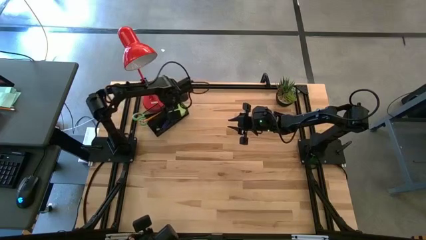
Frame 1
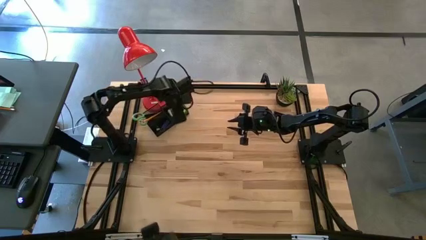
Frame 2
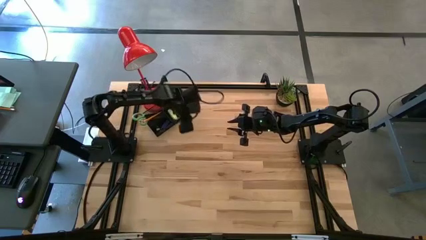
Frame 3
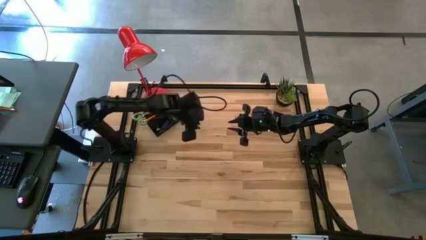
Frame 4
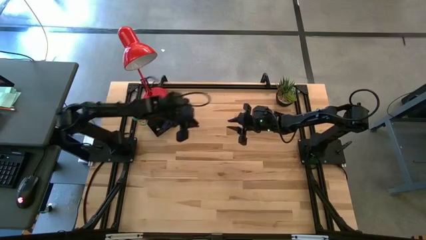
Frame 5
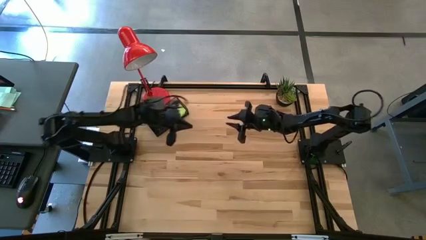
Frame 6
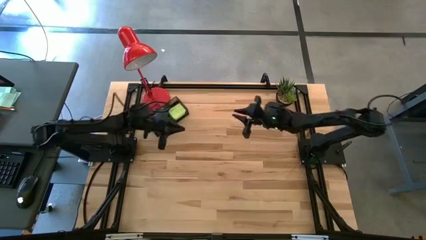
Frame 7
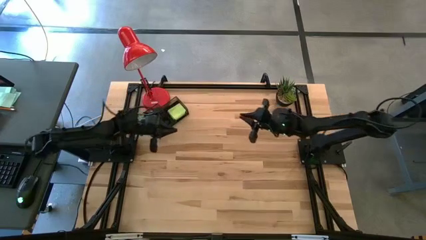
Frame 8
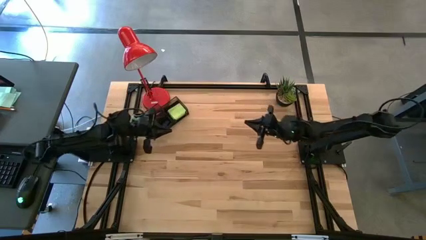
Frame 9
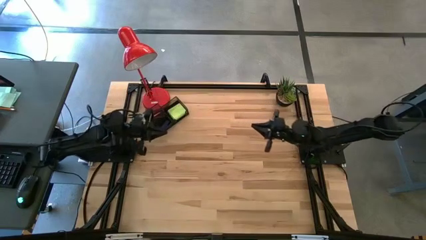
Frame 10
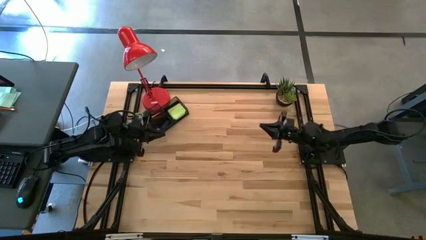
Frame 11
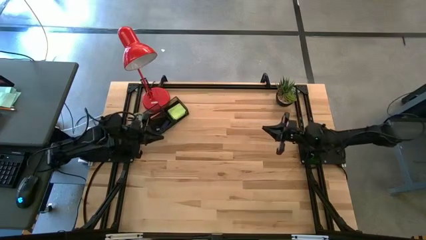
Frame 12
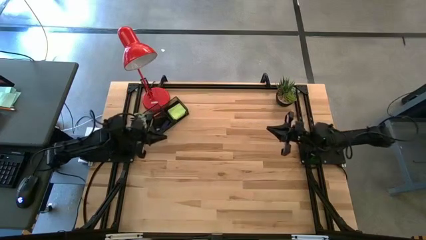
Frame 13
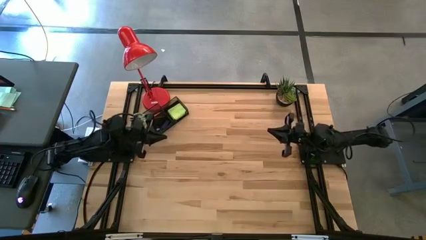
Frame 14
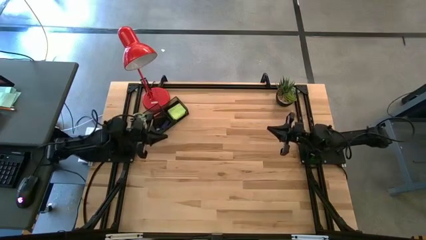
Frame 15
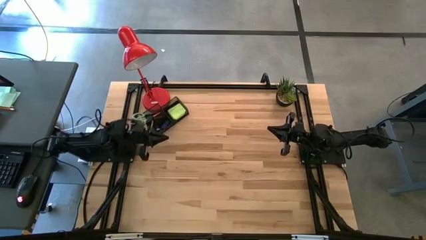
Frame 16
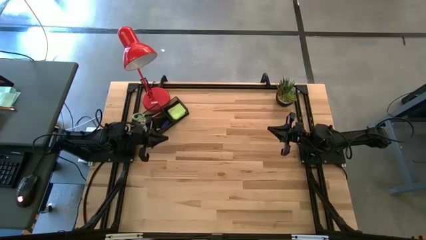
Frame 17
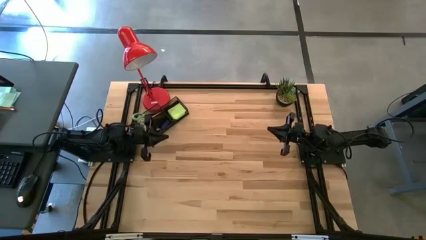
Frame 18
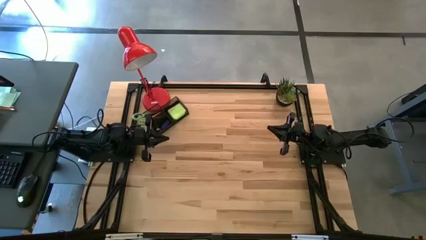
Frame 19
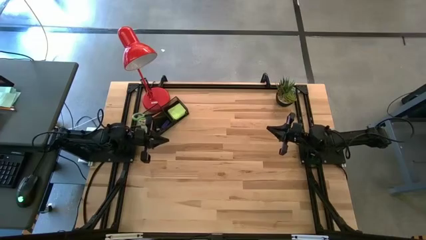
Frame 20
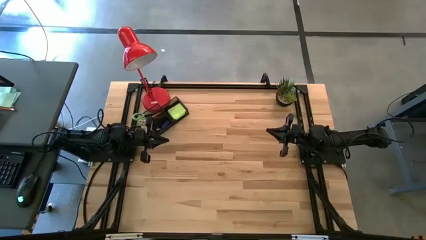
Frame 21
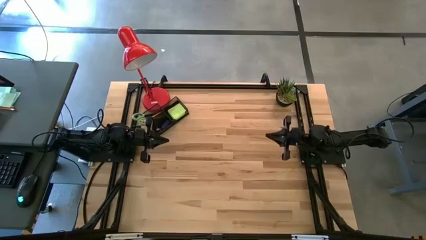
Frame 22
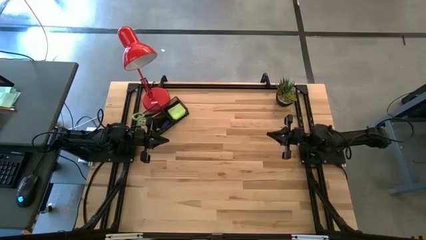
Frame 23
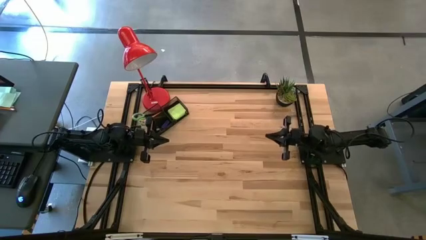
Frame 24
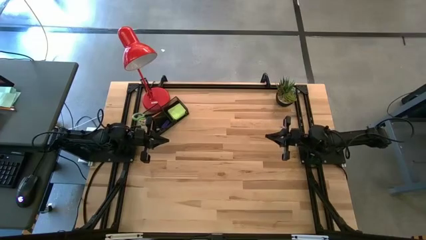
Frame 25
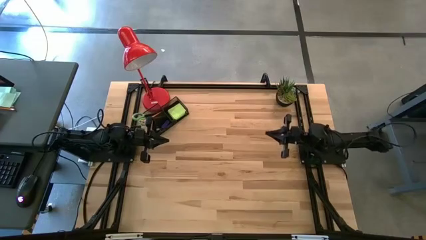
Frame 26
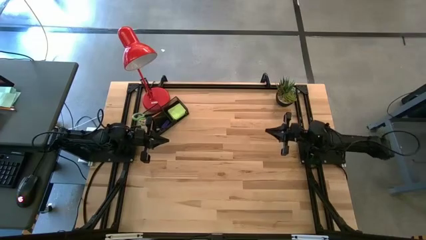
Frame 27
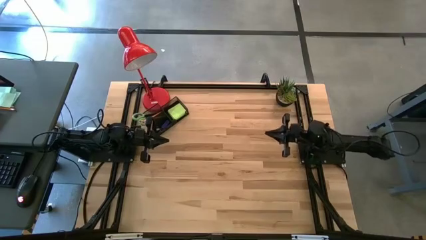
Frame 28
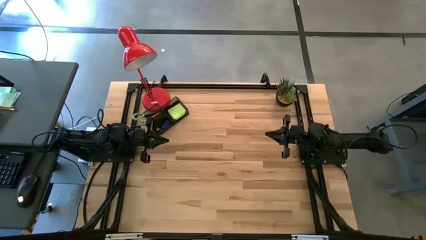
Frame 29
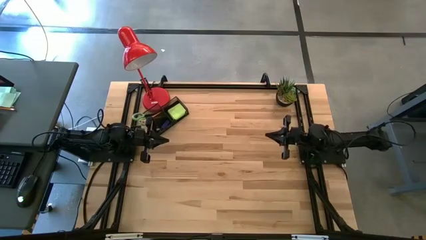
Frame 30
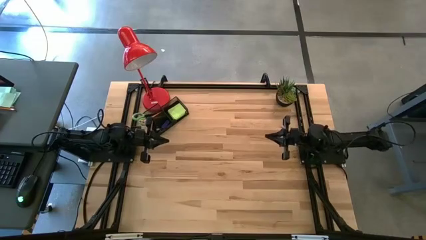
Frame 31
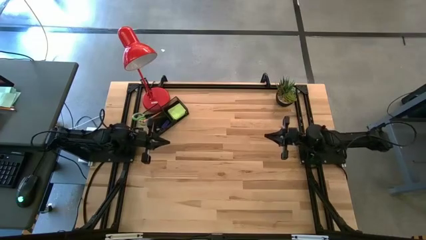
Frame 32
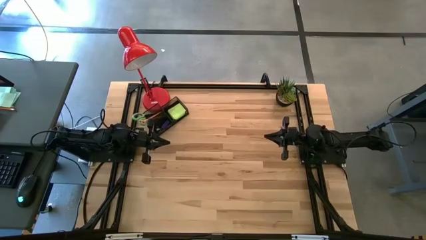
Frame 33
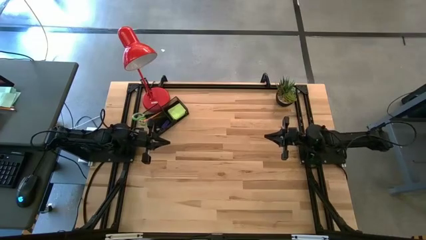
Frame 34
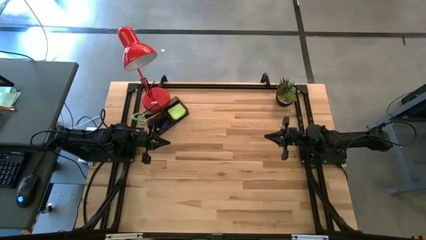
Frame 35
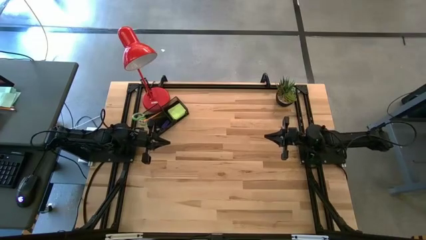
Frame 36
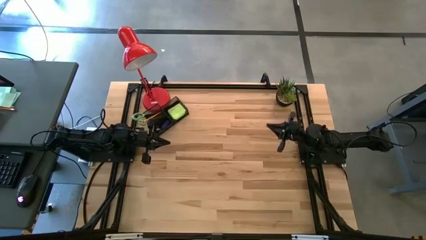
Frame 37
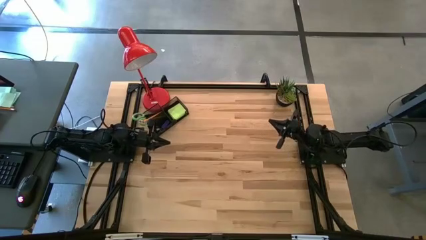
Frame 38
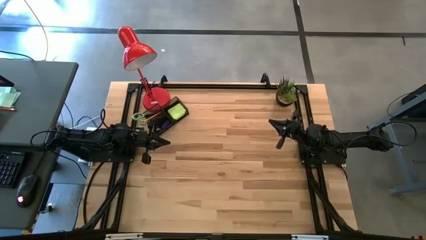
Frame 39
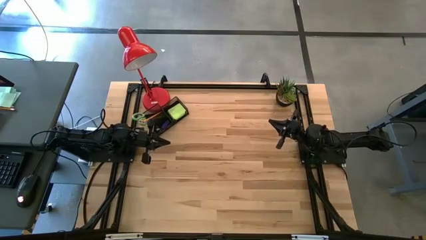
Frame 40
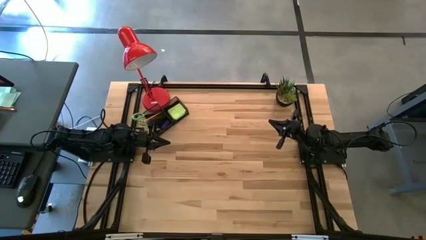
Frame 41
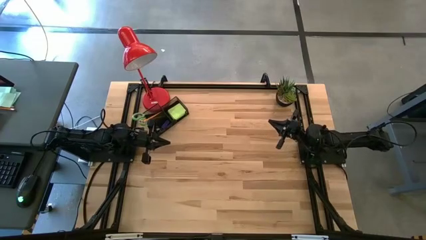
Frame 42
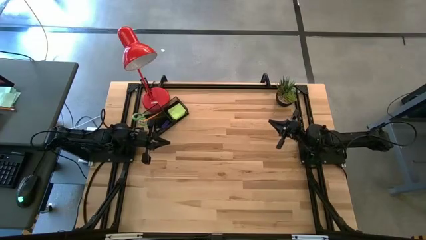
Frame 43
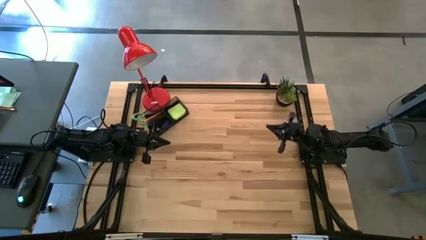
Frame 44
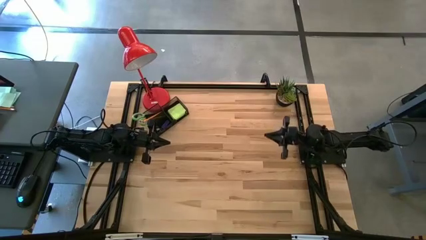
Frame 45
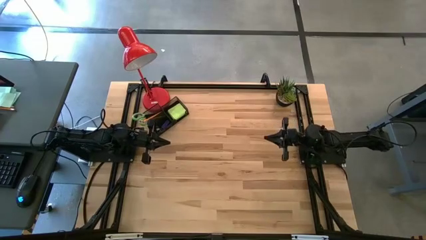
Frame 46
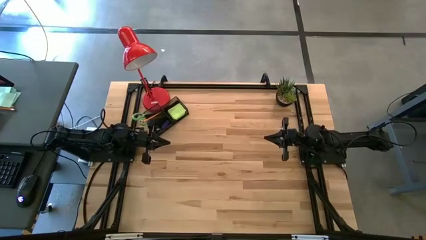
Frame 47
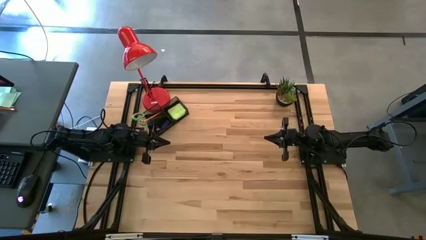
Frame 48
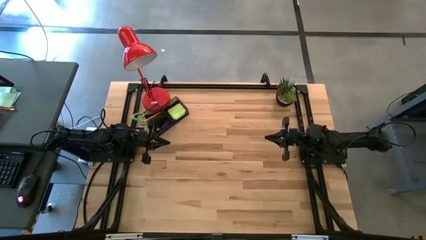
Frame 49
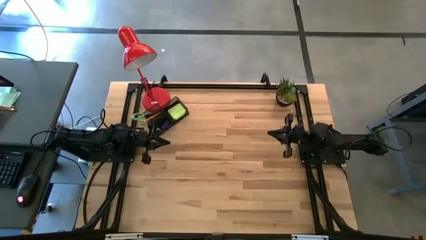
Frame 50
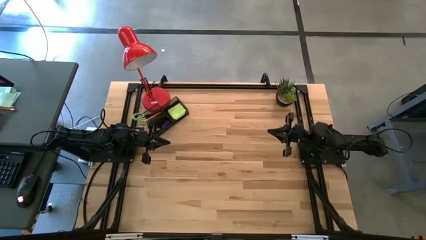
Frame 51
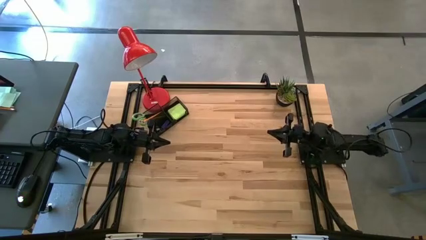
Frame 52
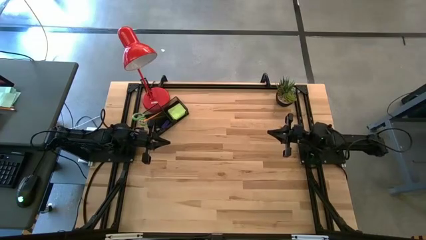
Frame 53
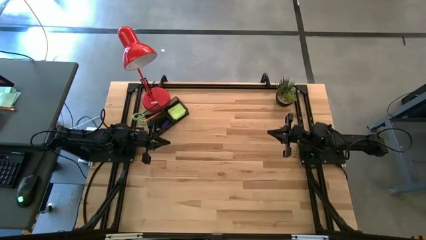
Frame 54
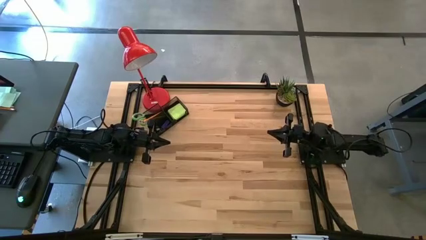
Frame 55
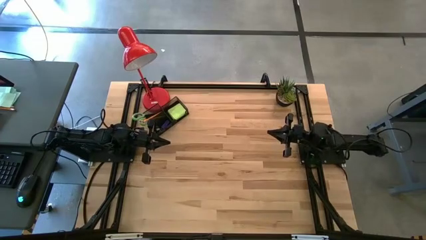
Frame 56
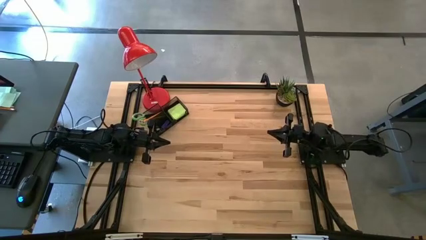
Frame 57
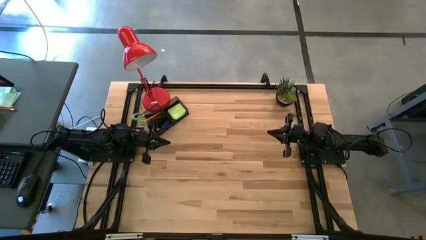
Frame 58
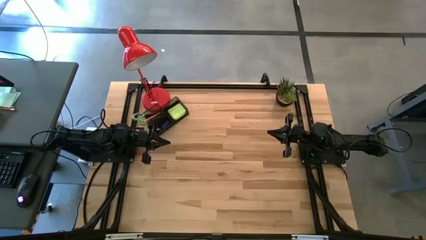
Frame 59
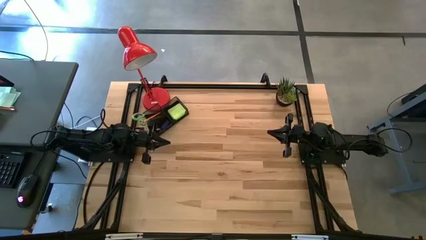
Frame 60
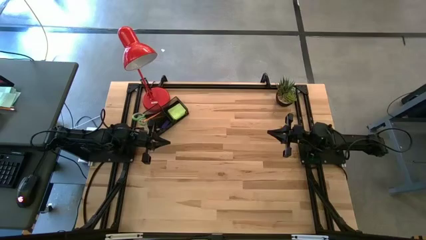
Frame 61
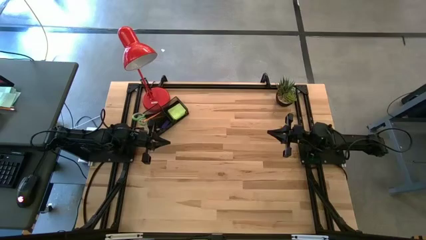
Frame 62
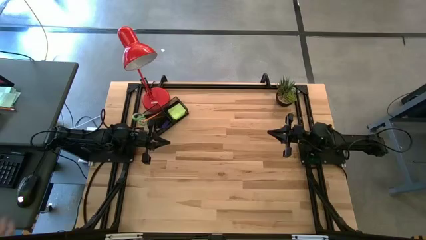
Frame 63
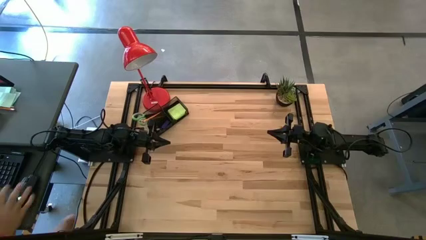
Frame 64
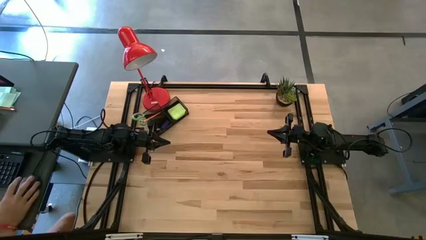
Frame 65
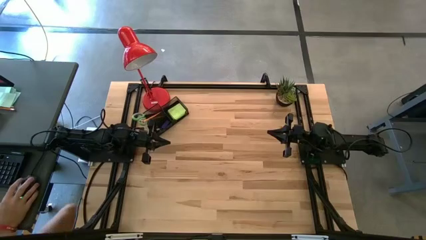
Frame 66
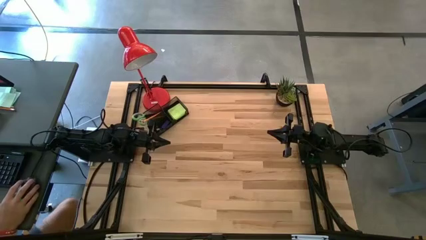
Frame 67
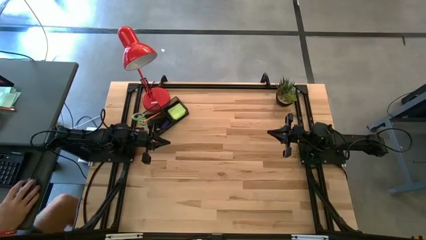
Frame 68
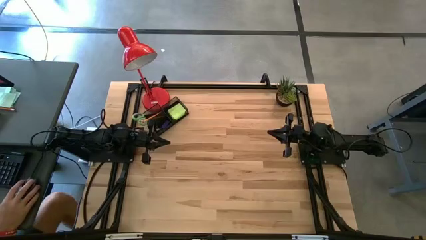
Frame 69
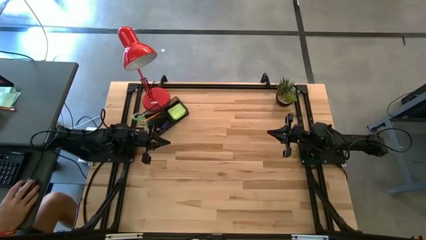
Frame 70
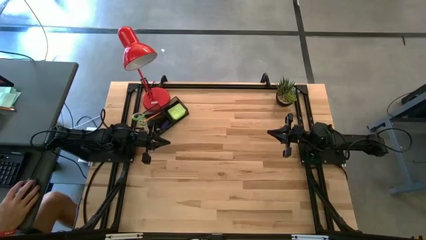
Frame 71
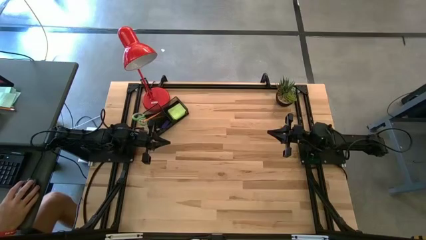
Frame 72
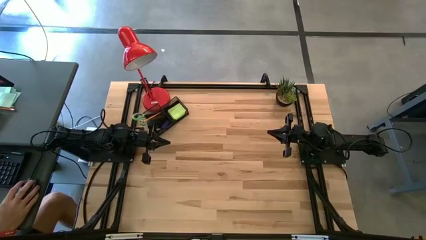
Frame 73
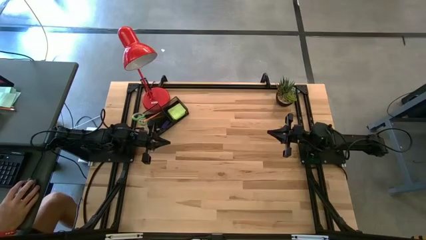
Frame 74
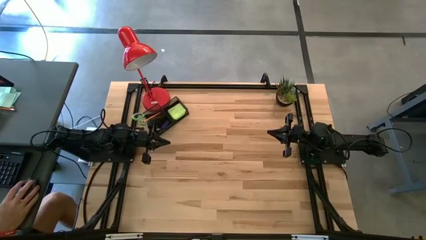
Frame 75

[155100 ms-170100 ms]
Task: Pick and place office supplies into organizer
Return to Home Position

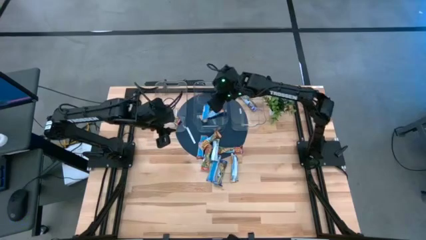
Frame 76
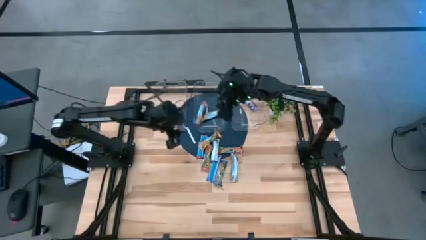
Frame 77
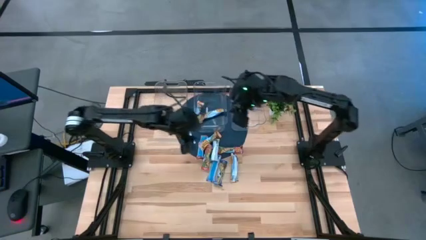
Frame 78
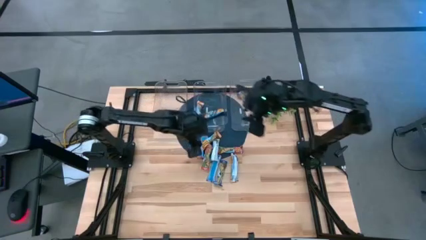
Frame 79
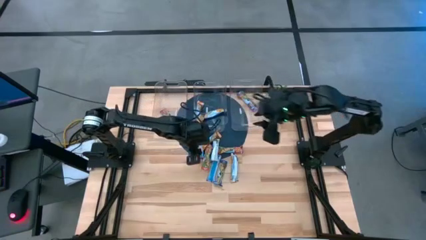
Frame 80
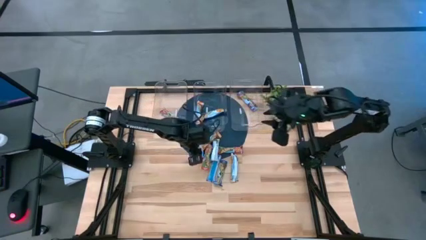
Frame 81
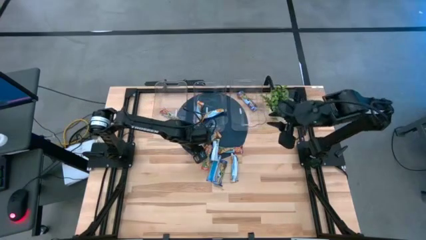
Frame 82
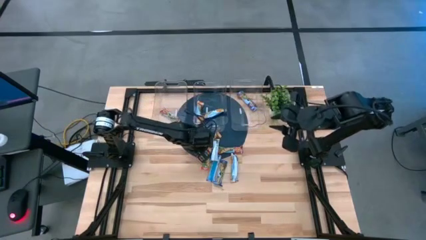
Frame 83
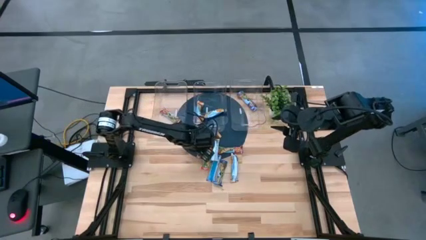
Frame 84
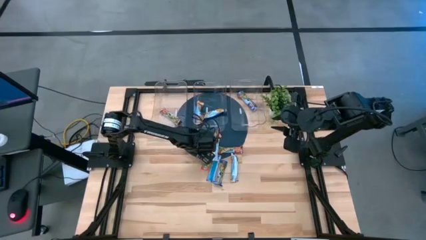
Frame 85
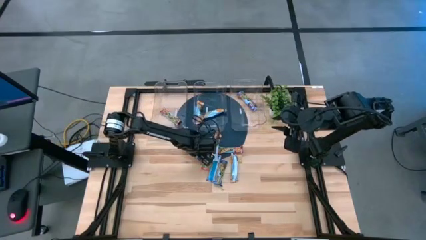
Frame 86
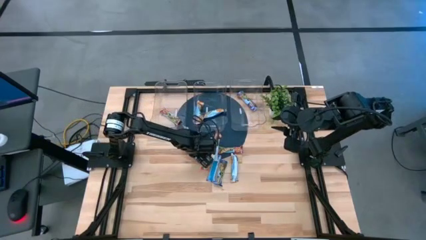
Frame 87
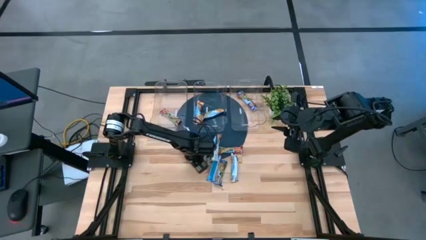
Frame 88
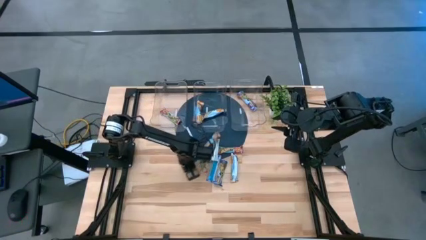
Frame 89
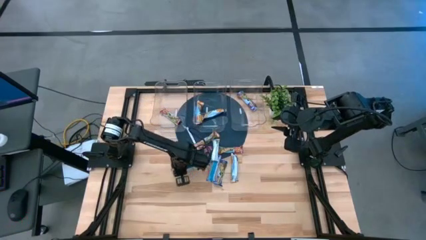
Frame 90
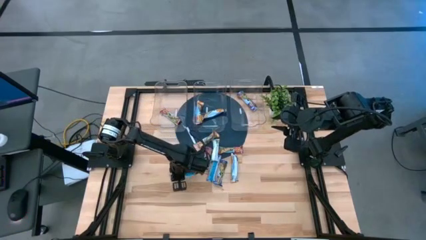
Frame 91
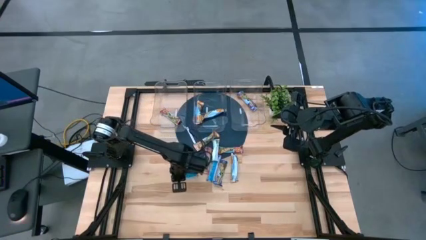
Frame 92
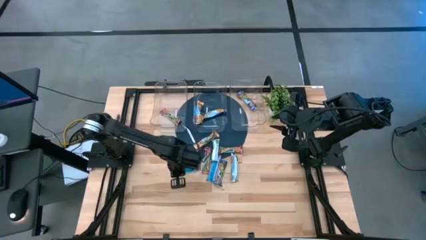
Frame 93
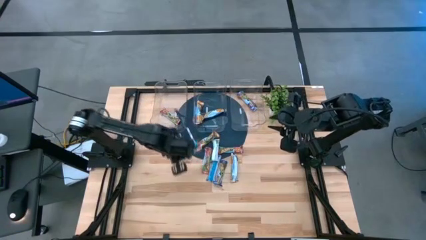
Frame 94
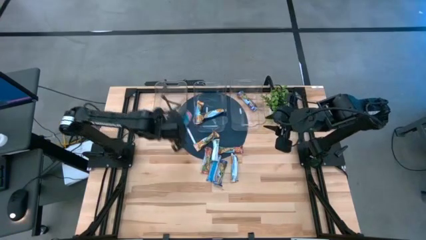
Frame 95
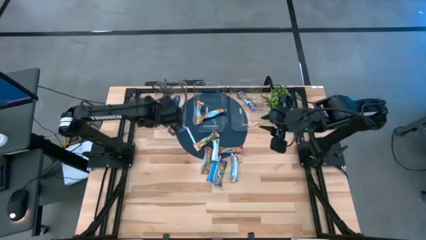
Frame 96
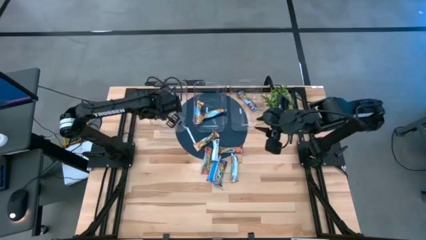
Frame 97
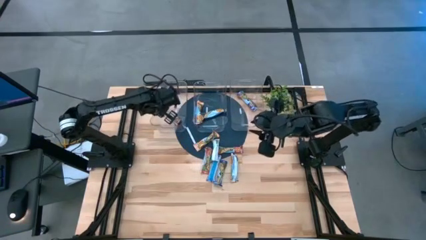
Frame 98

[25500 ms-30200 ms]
Task: Pick and place Granola Bars by type
Put the red granola bar into the left transparent bin
